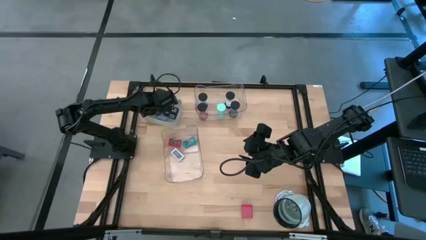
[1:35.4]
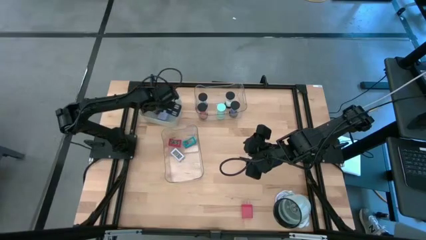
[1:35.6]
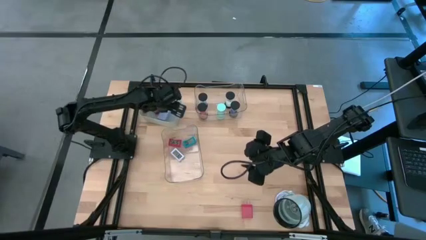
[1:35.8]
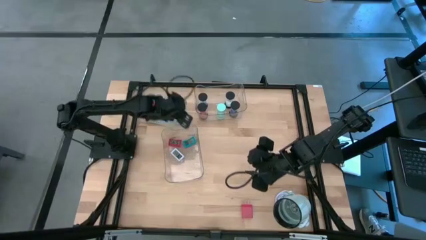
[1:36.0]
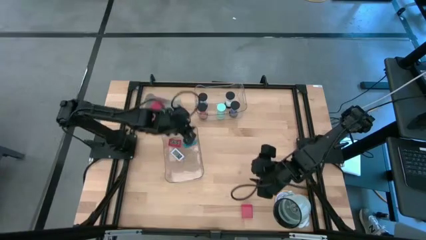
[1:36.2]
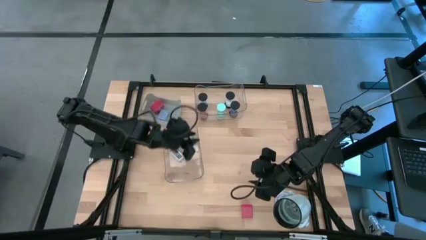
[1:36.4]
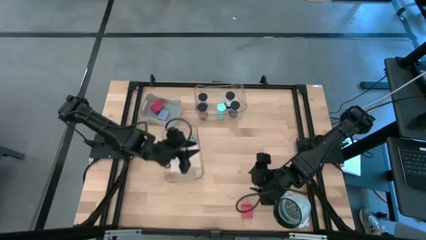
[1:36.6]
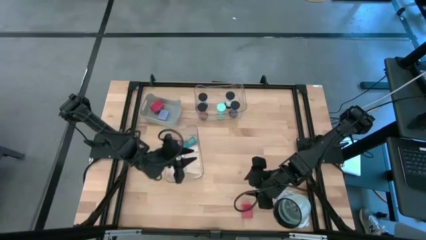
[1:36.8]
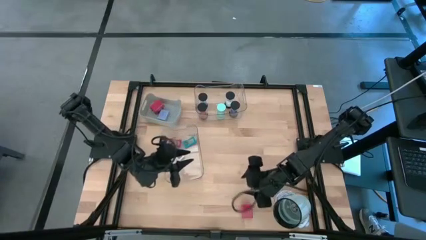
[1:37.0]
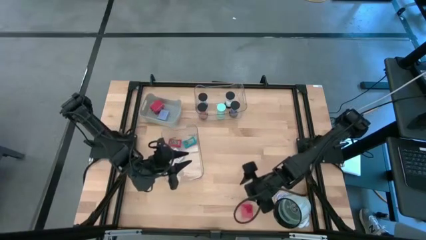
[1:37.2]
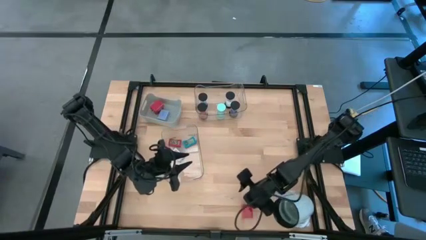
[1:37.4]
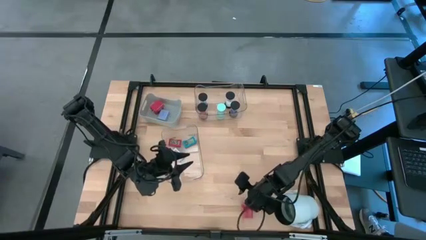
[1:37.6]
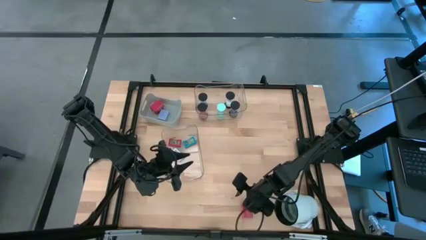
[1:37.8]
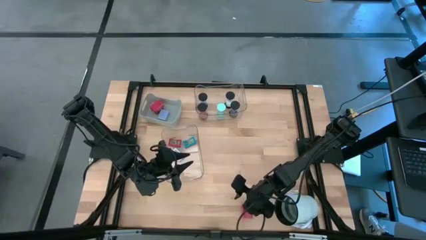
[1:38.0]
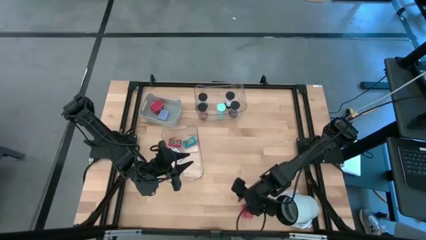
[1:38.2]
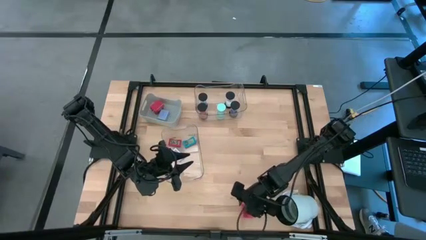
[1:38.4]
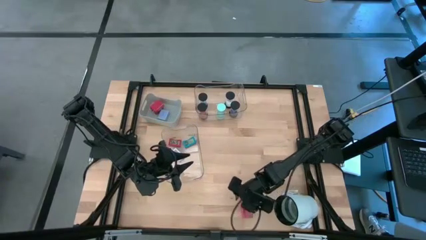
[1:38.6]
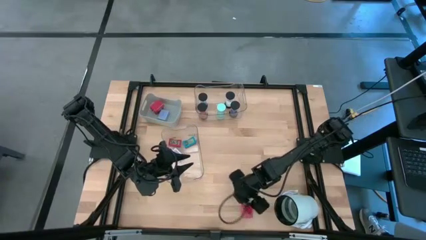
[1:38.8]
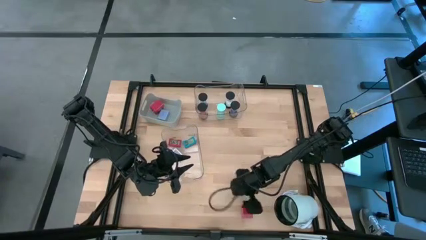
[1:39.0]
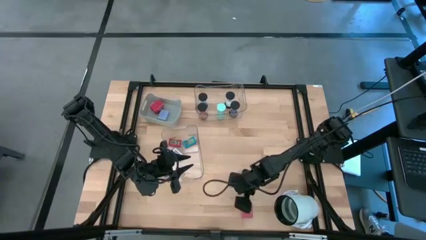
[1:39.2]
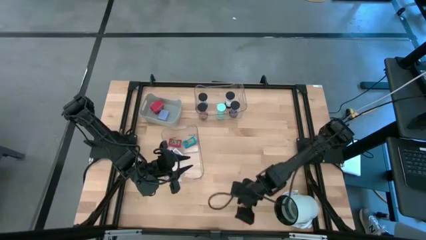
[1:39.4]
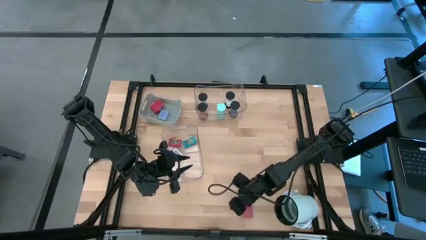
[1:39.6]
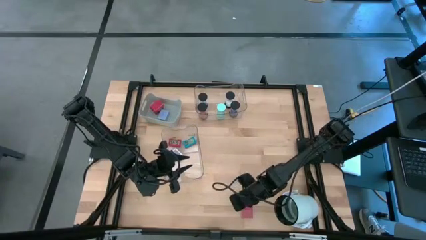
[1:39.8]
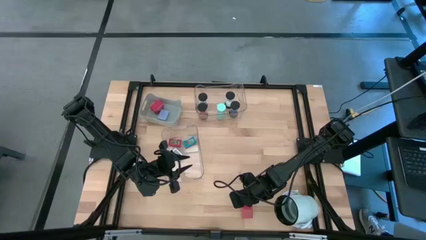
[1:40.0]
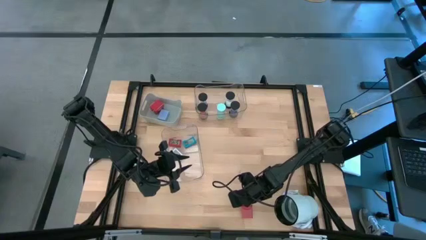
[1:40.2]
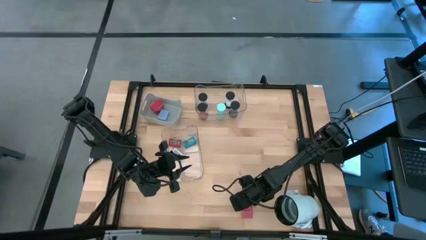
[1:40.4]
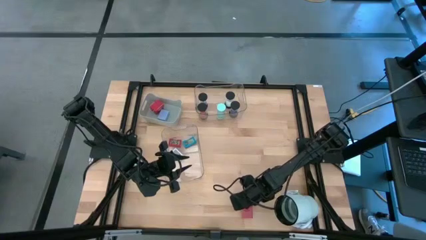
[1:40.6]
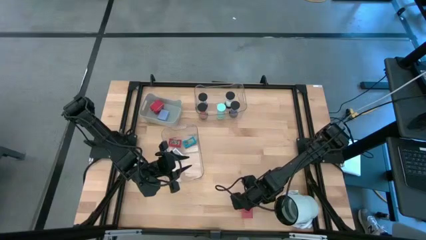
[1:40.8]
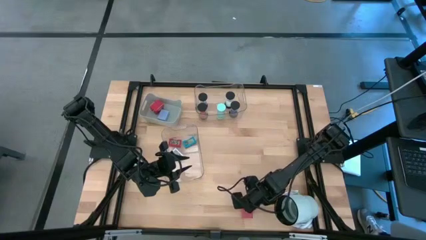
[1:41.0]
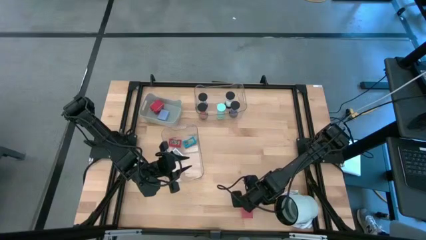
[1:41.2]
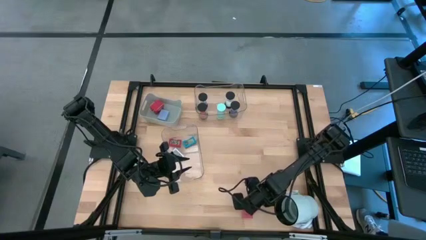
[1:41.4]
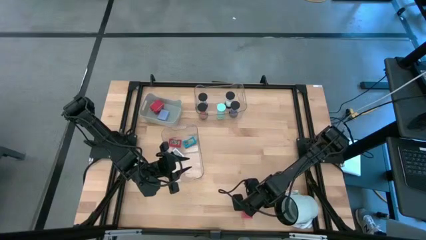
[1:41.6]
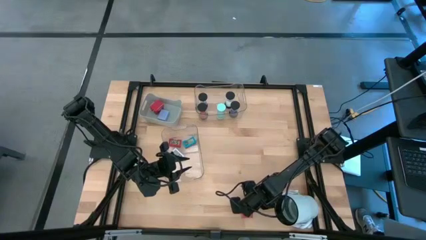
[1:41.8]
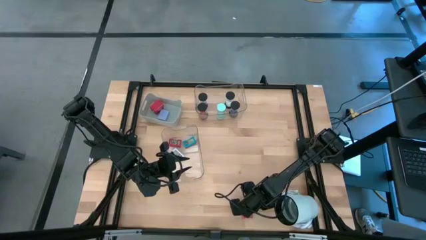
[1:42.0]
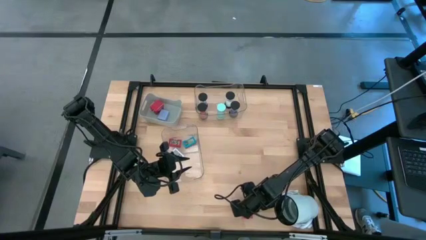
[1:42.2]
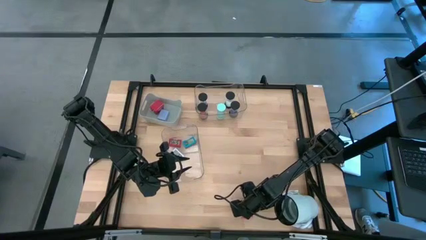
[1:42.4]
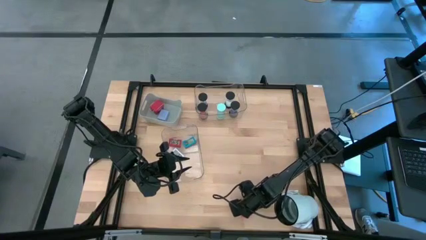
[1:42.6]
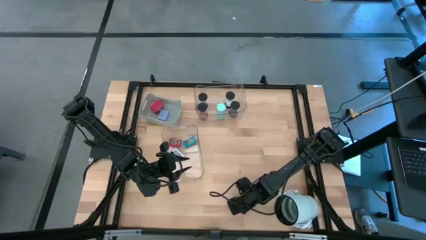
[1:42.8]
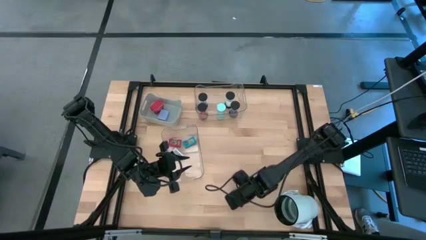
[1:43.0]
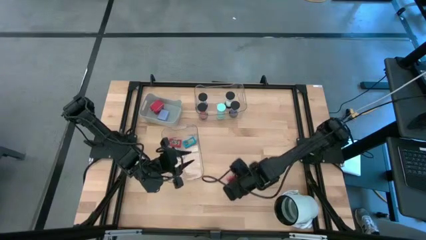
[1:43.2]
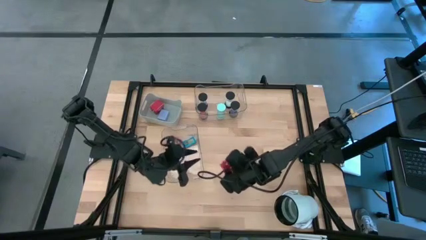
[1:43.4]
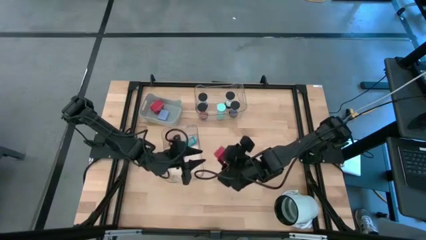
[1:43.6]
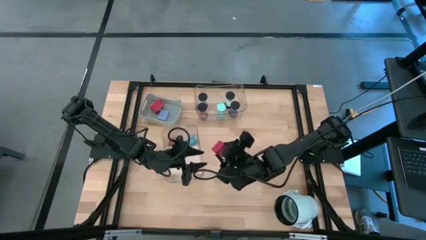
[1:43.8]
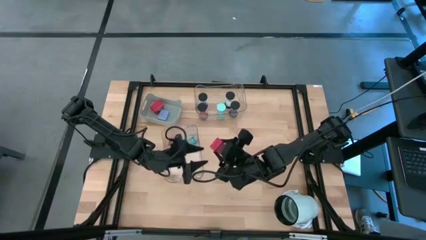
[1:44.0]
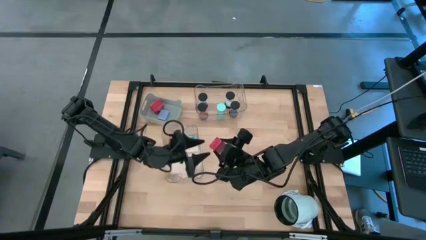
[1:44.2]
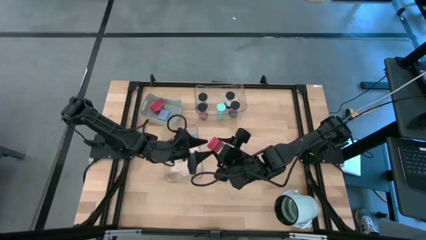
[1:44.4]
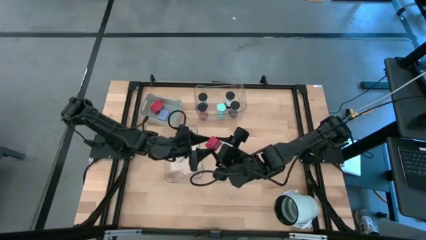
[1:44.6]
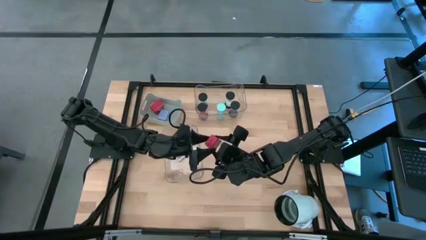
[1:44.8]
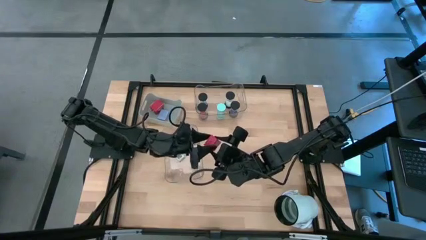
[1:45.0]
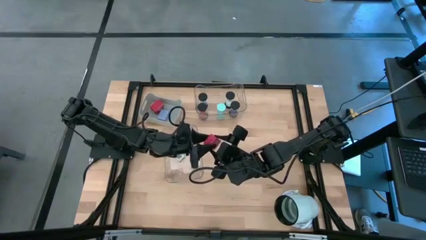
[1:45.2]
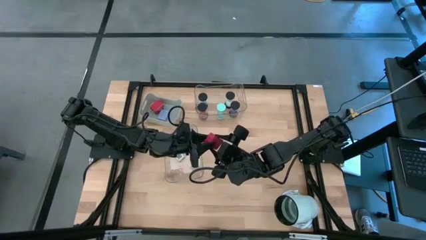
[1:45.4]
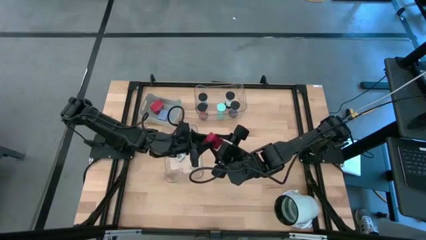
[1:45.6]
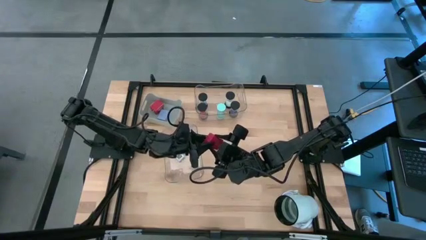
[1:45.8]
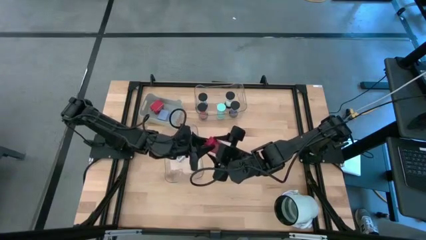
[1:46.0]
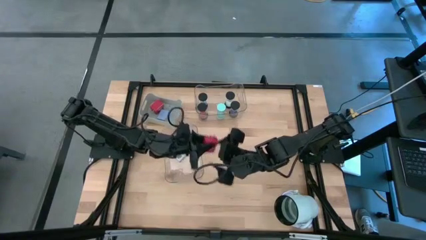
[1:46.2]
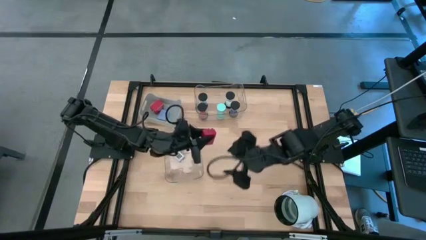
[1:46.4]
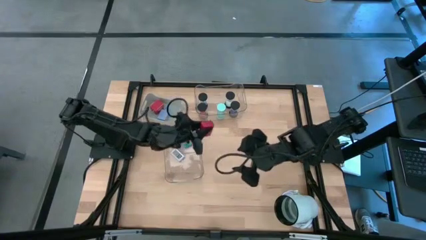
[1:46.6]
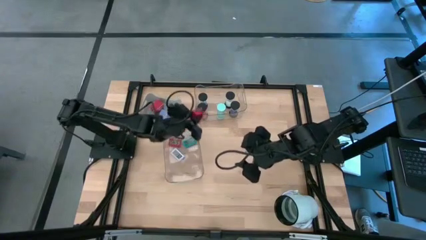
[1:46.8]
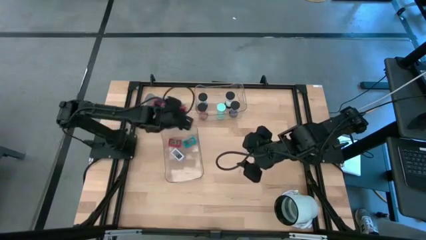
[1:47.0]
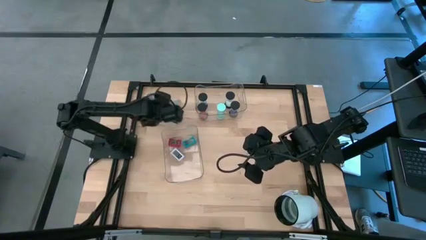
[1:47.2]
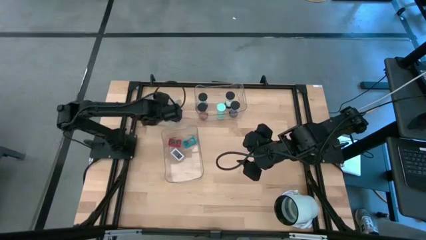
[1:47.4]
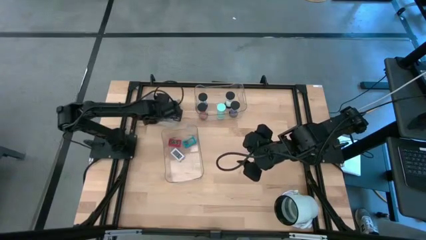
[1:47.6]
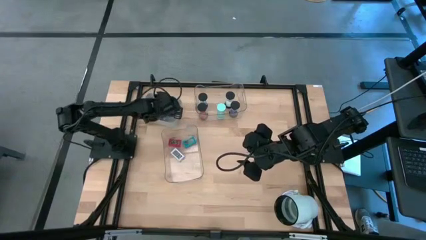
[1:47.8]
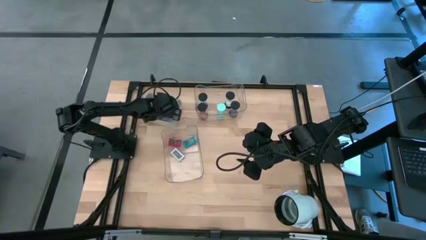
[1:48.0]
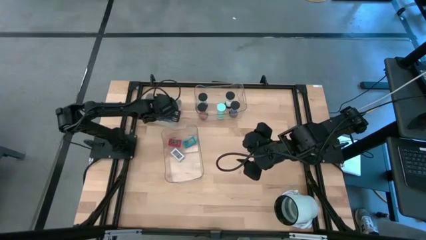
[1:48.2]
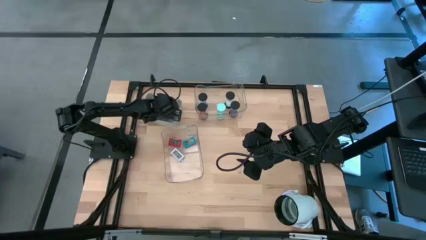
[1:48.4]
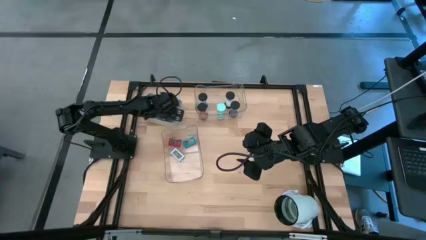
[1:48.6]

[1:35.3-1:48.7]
Task: Pick & Place Office items
Put the red charger adapter into the gray bin
